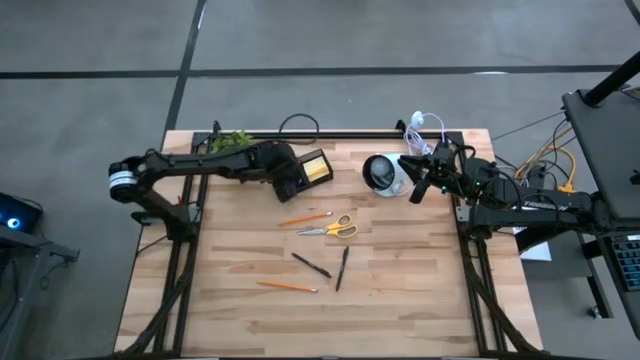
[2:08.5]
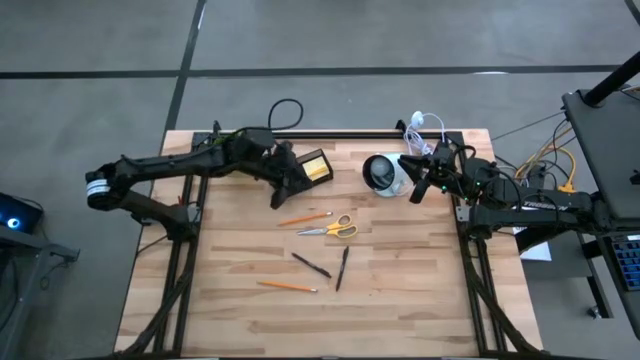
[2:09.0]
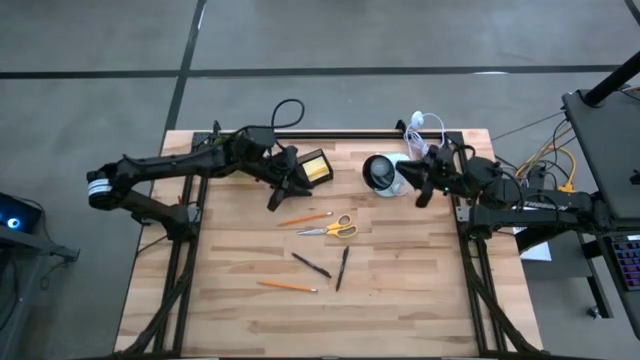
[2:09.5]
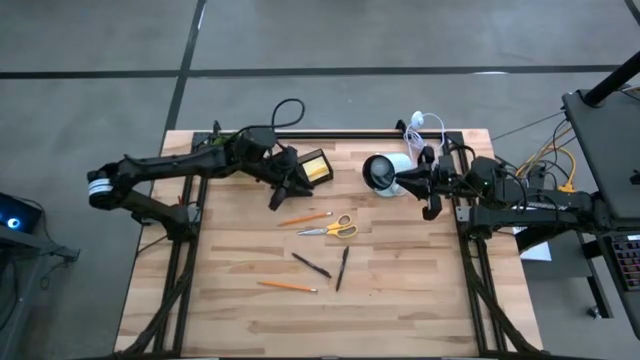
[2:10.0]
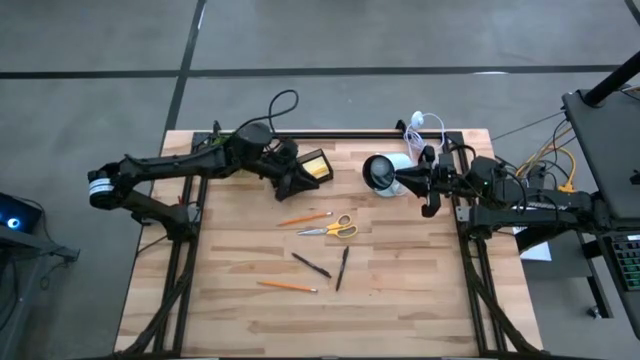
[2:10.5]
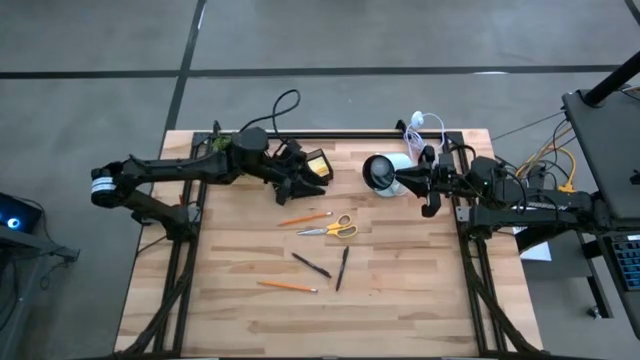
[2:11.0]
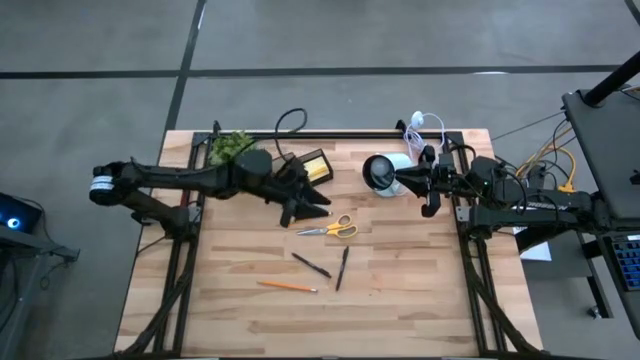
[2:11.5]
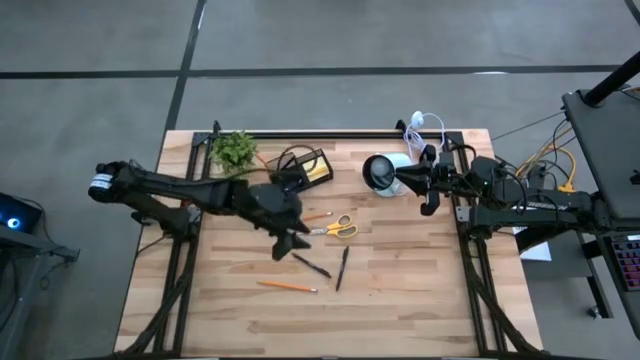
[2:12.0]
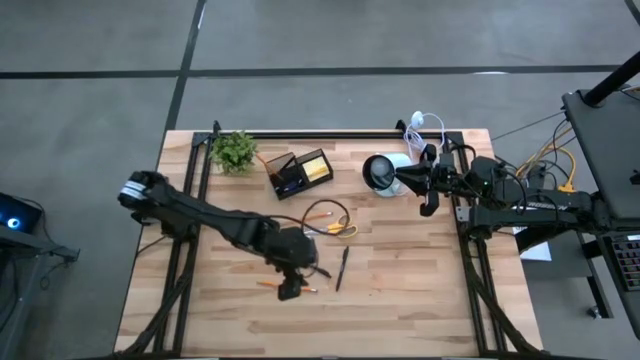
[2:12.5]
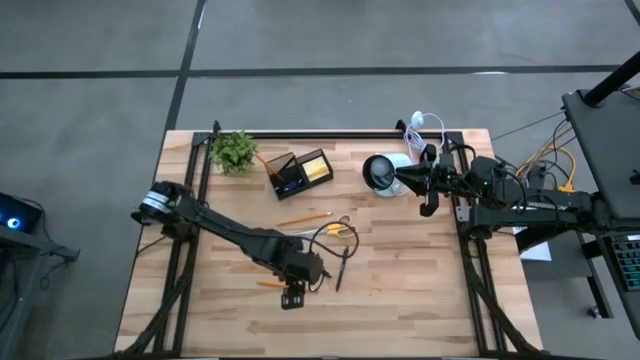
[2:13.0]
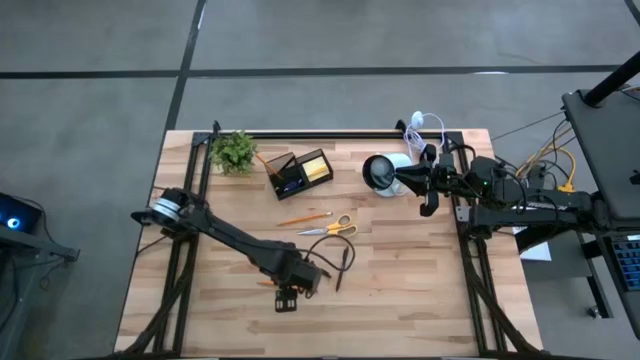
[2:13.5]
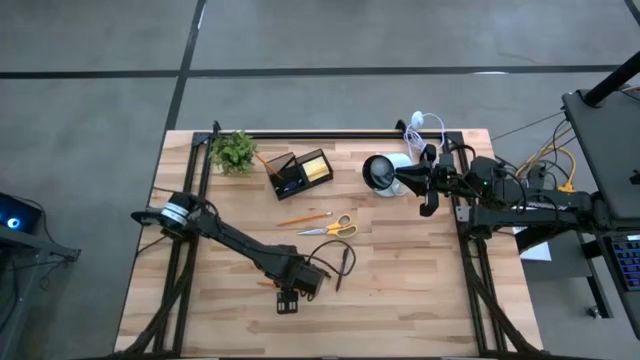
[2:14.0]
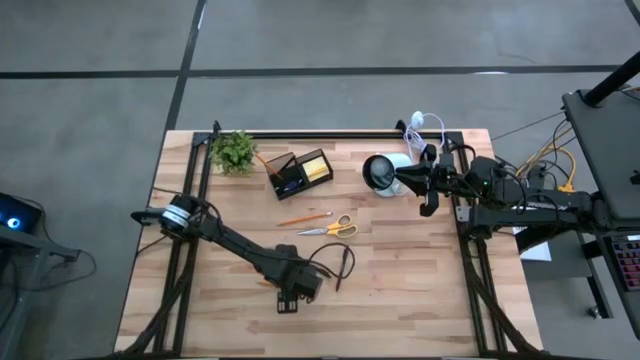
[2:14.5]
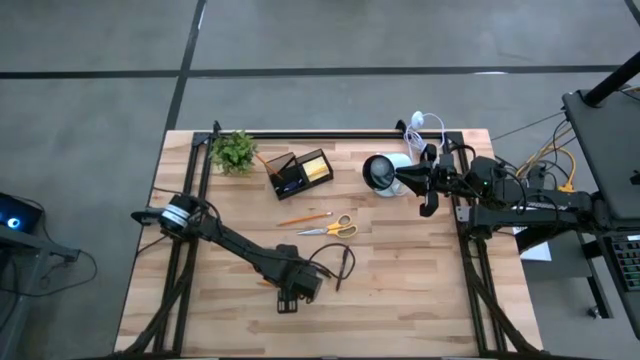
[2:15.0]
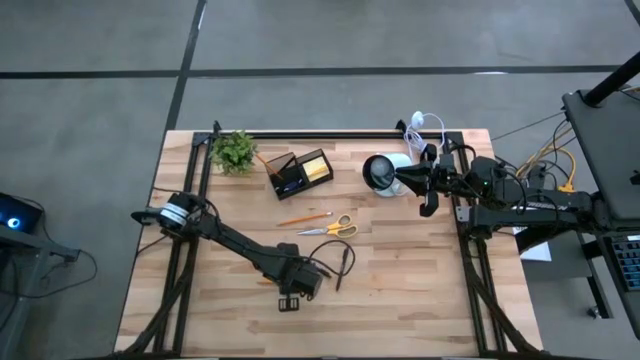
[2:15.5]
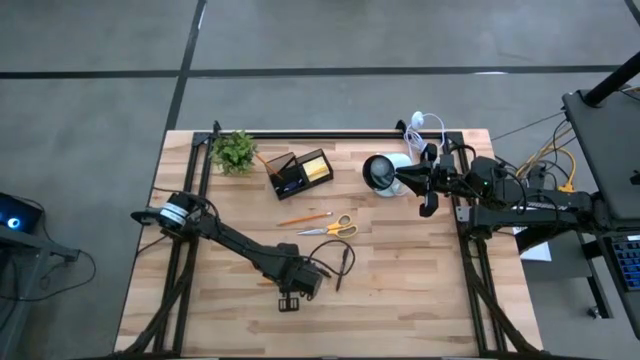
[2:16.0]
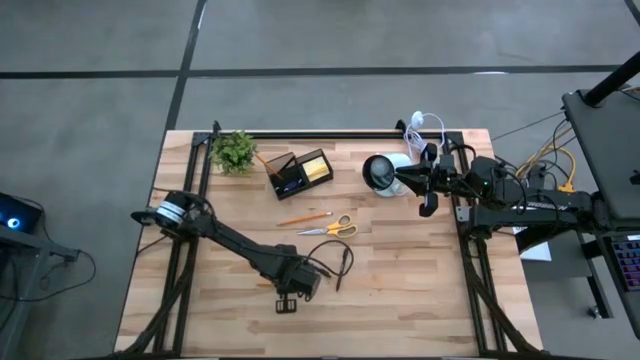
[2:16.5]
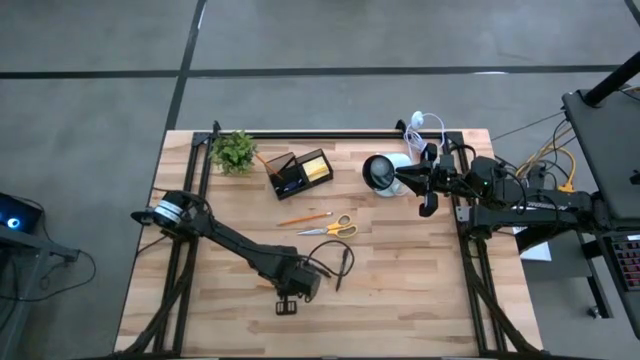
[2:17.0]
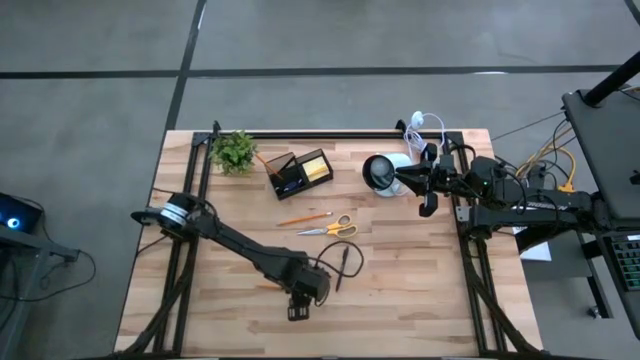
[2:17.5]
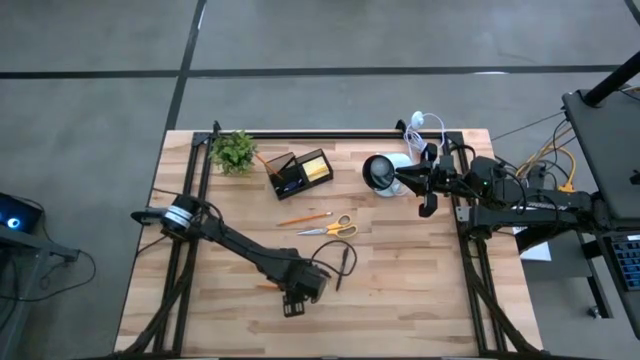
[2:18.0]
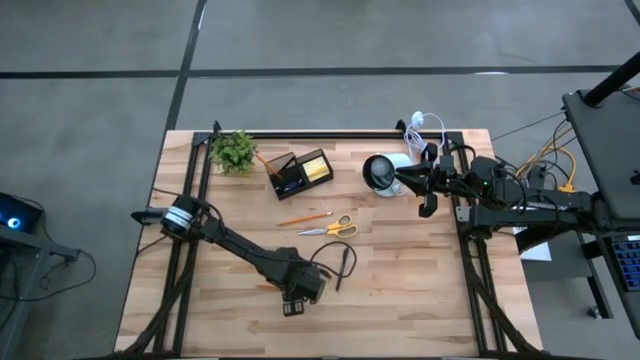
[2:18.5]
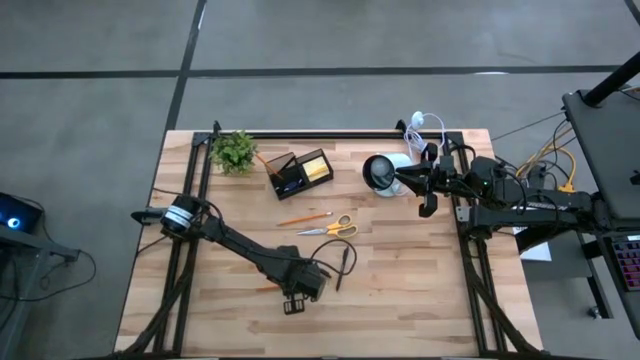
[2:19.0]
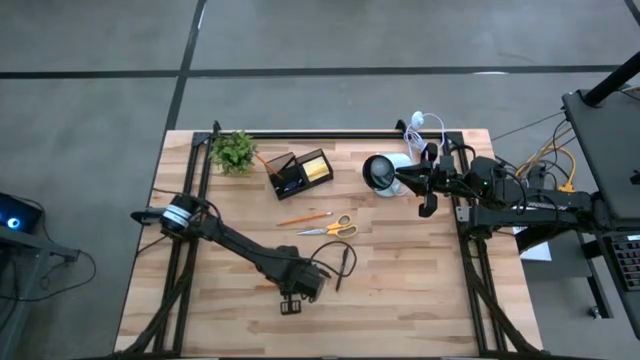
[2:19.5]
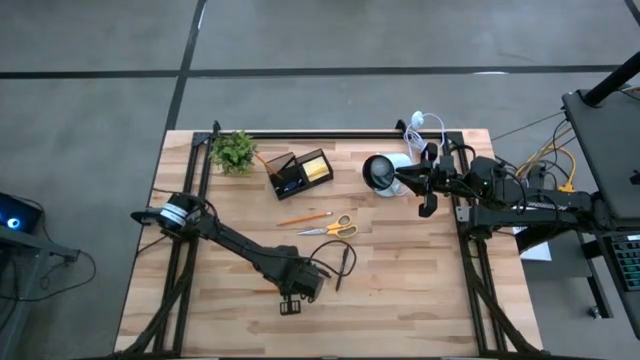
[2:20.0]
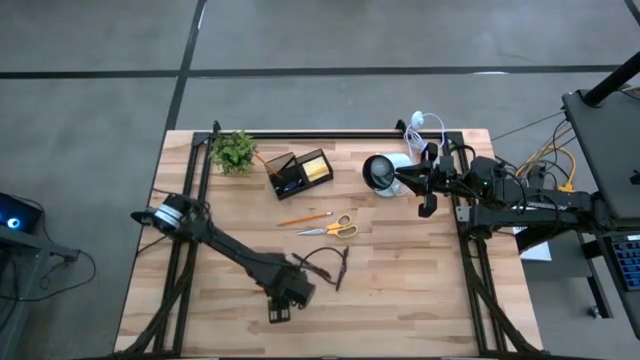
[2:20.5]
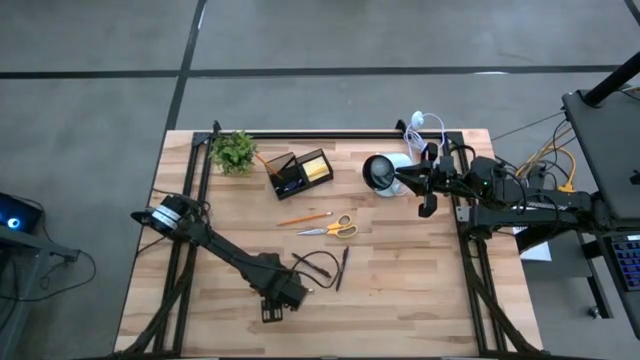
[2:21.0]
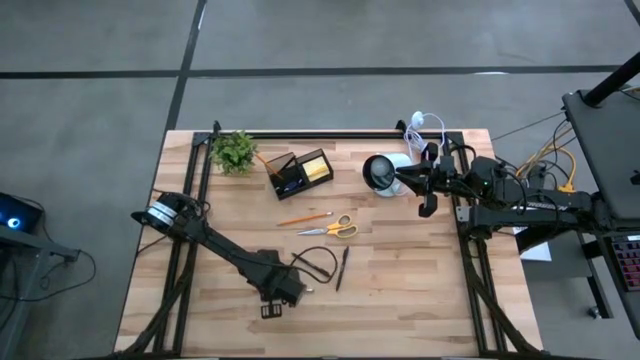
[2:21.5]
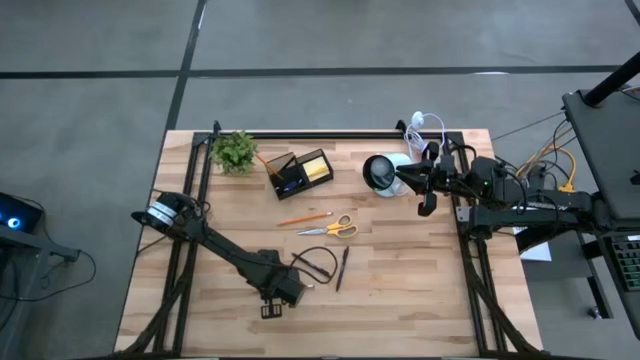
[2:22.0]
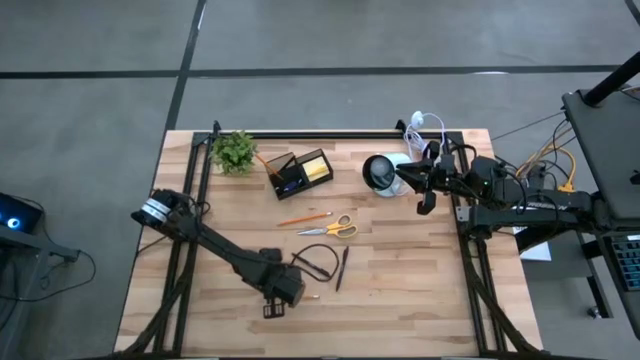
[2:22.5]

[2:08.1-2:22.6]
Task: Pick and place office supplies into organizer
Put the bottom yellow pencil into the black desk organizer

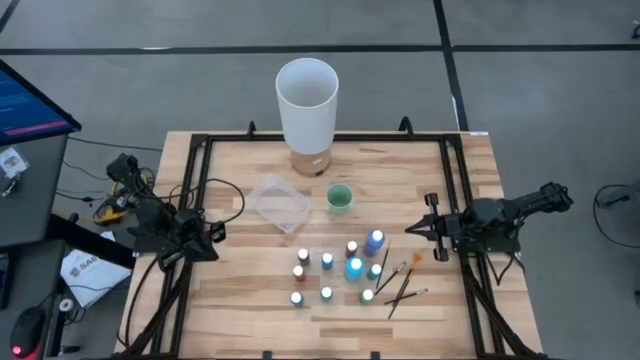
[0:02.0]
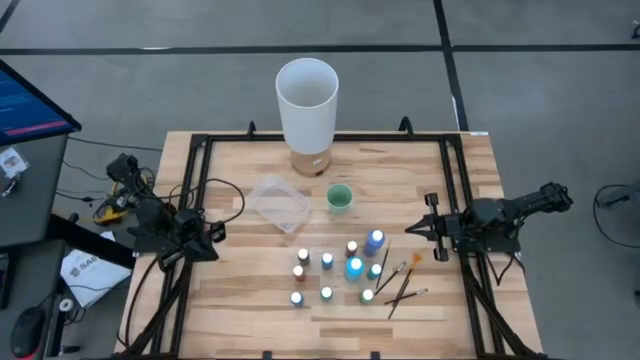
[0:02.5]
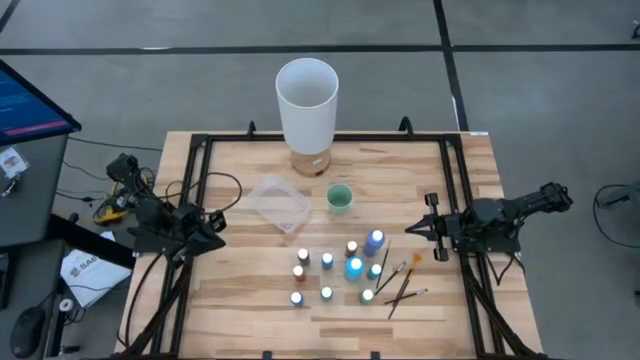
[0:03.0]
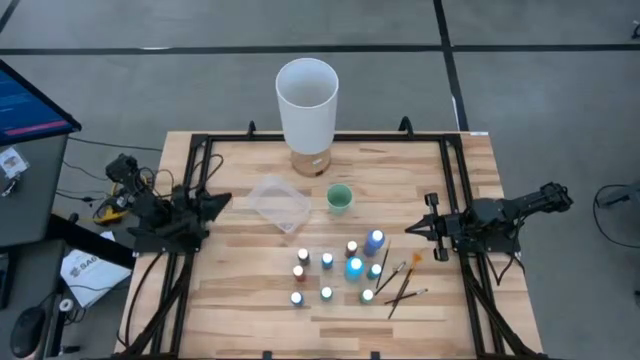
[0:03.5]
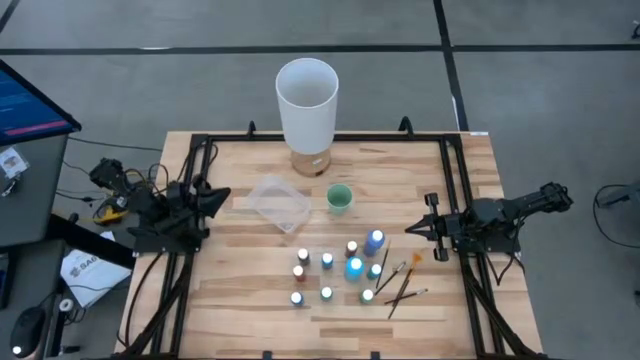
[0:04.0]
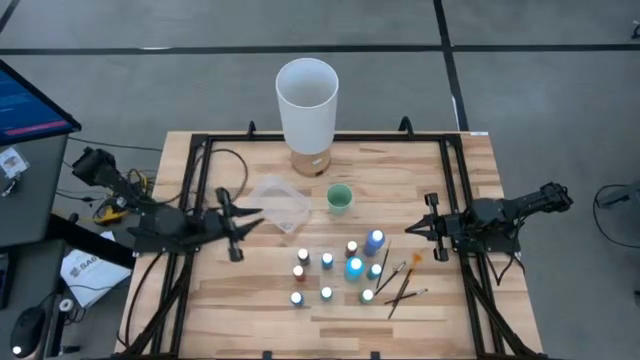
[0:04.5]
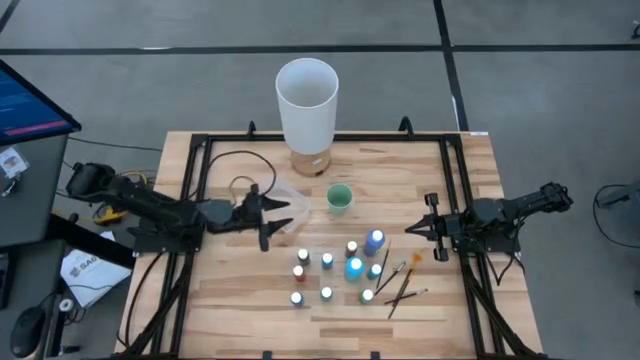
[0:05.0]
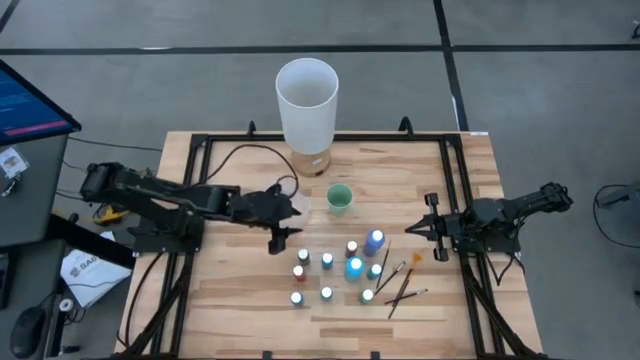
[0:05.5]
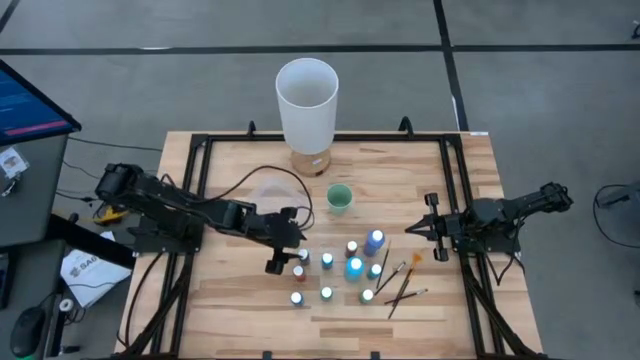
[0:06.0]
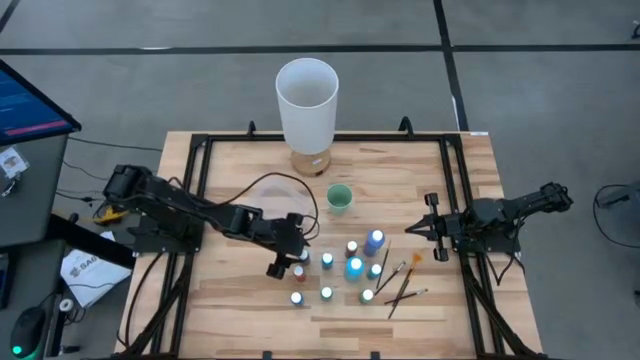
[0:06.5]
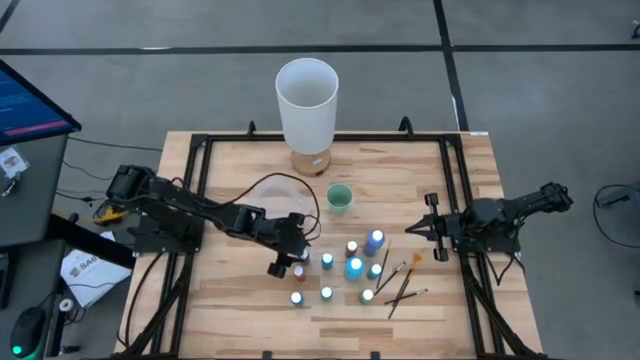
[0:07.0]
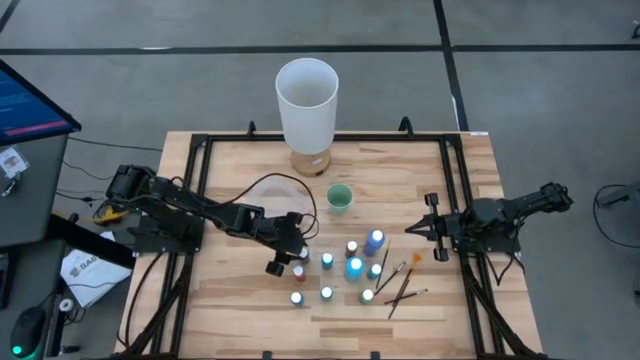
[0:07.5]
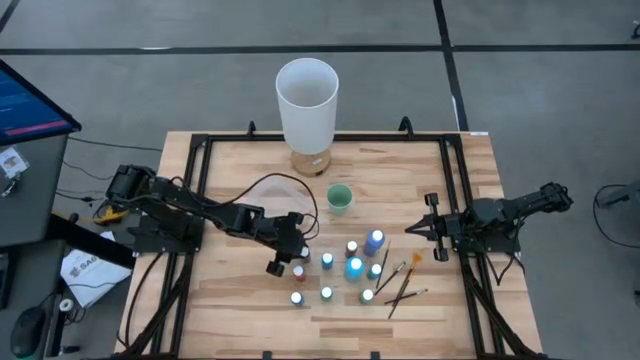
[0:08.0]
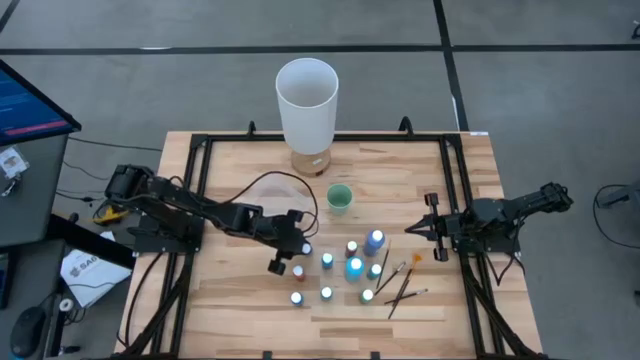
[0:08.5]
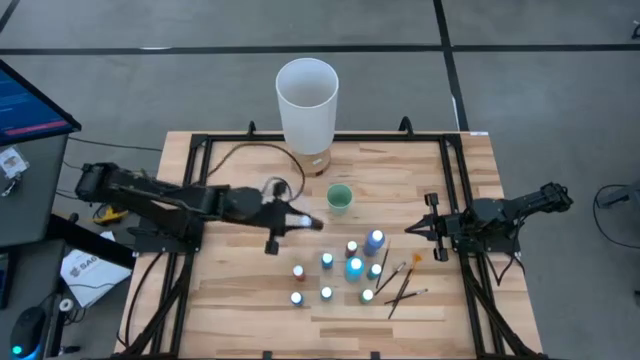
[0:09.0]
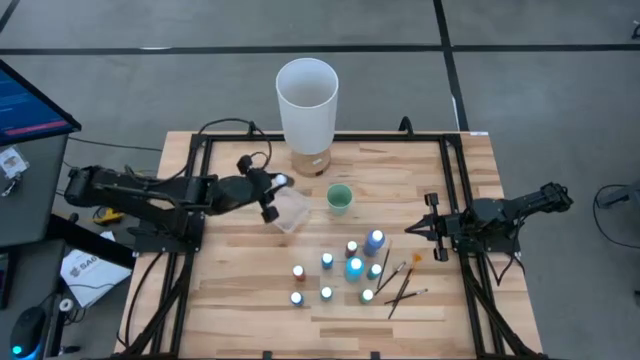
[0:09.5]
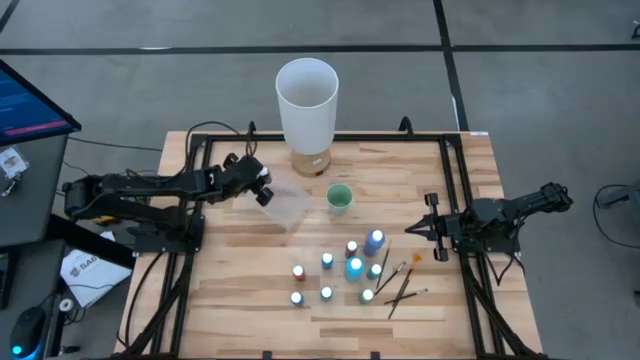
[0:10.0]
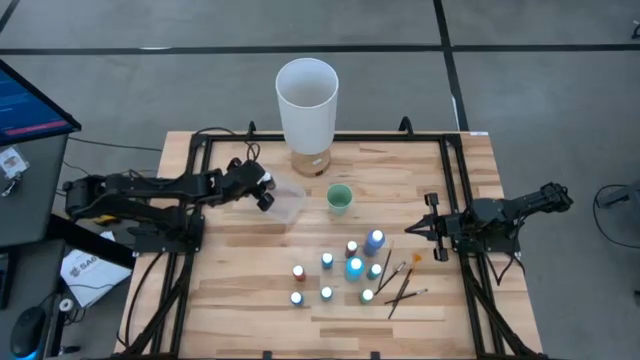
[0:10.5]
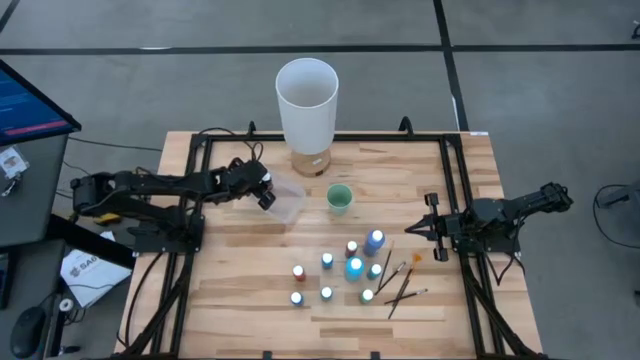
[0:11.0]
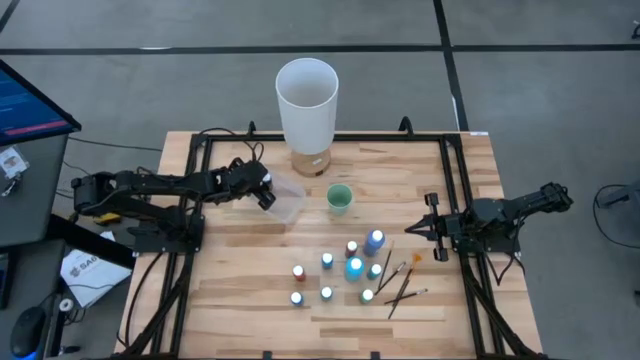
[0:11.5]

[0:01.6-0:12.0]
Task: Pick & Place Paint Supplies
Put the black paint bottle into the transparent bin
